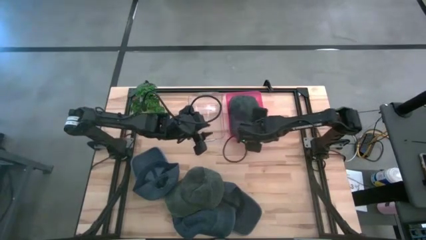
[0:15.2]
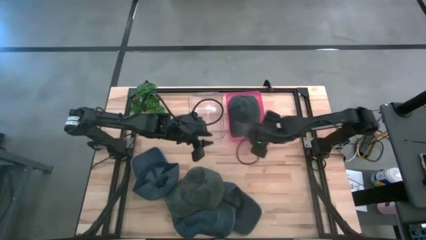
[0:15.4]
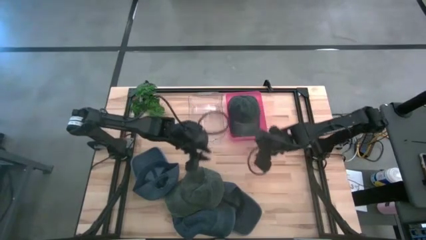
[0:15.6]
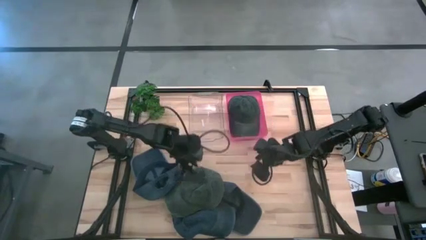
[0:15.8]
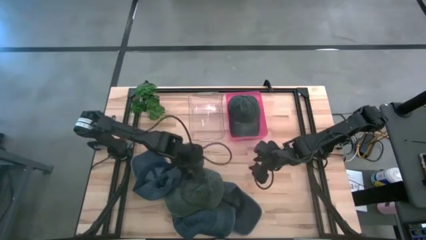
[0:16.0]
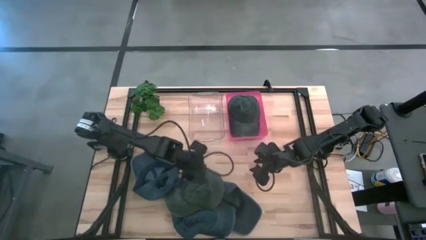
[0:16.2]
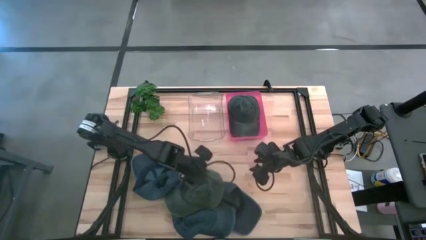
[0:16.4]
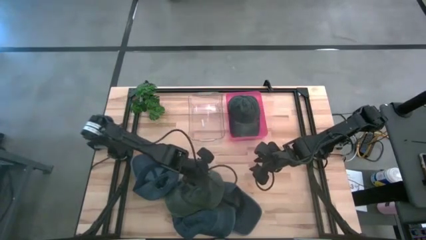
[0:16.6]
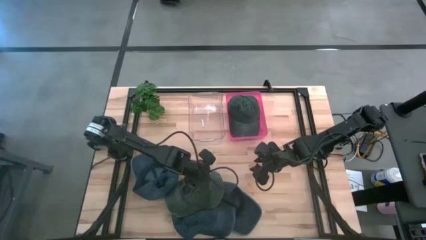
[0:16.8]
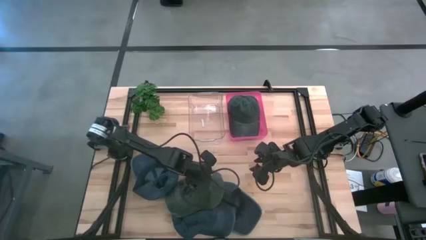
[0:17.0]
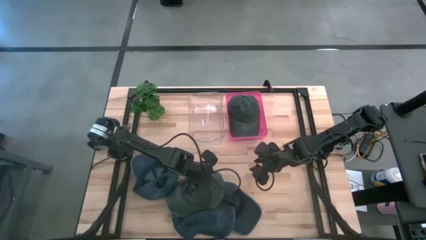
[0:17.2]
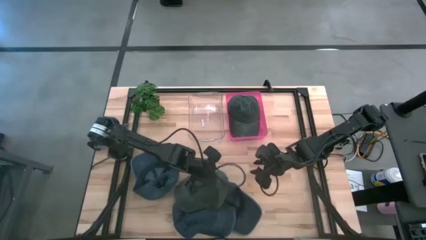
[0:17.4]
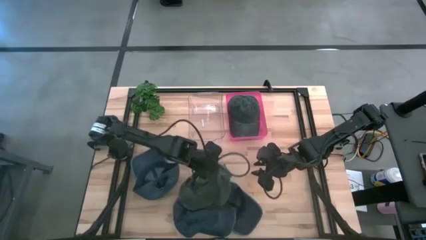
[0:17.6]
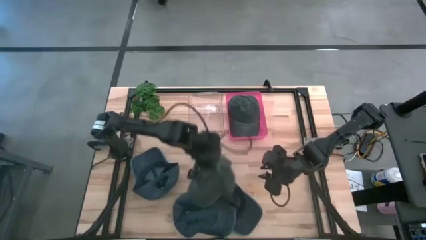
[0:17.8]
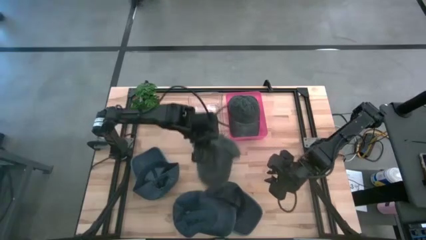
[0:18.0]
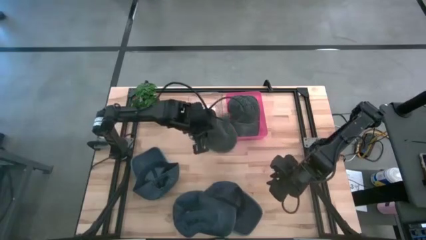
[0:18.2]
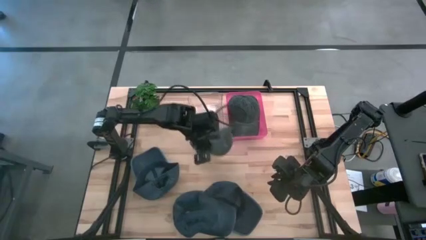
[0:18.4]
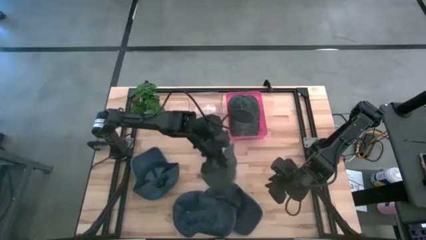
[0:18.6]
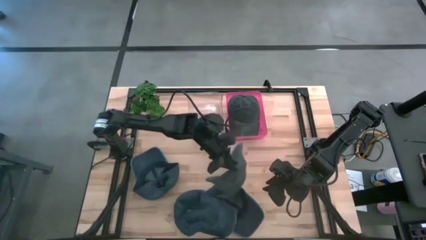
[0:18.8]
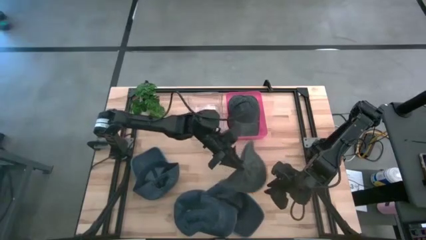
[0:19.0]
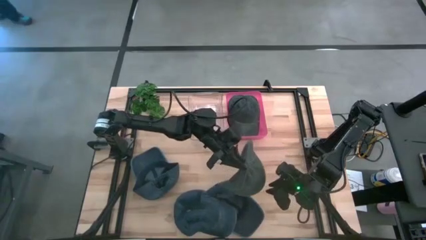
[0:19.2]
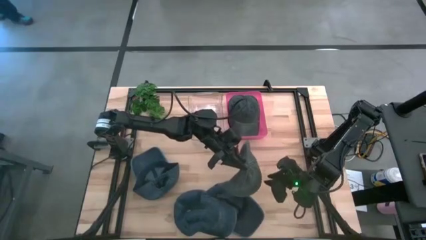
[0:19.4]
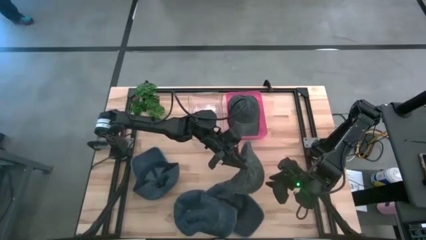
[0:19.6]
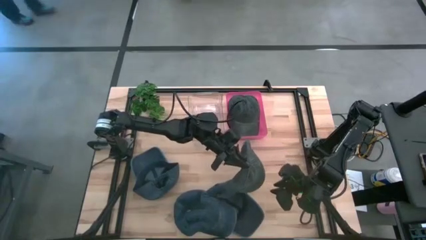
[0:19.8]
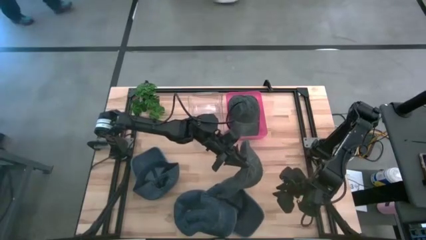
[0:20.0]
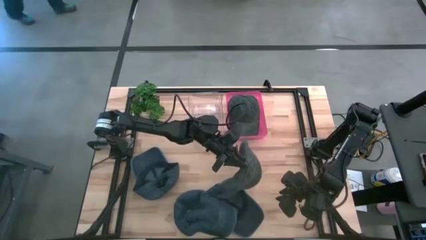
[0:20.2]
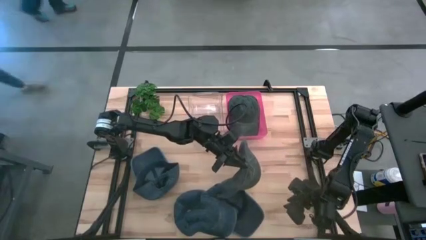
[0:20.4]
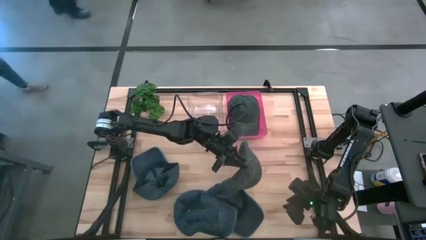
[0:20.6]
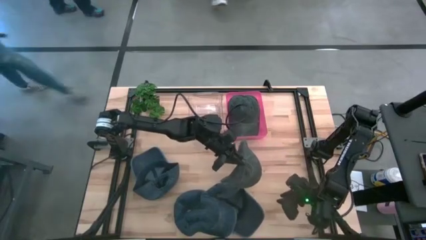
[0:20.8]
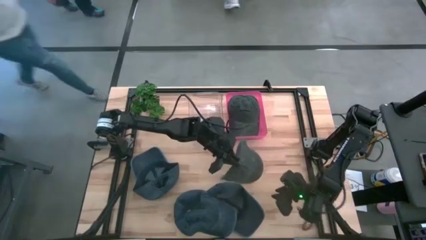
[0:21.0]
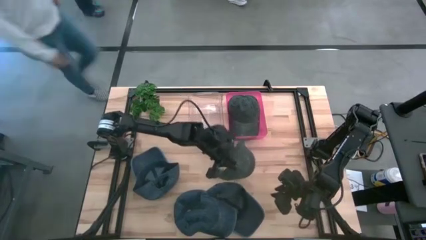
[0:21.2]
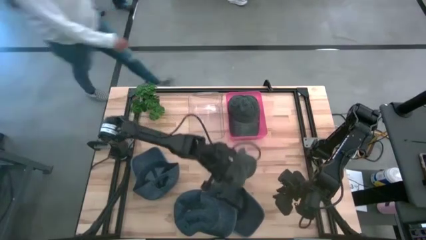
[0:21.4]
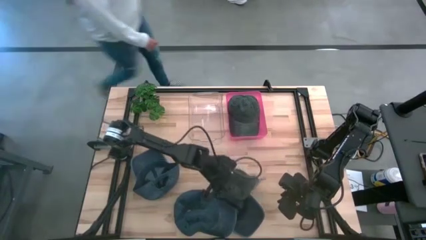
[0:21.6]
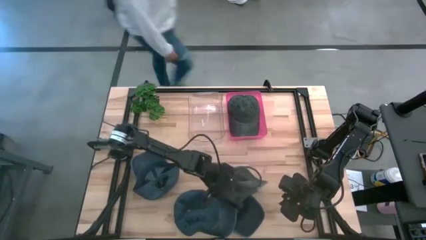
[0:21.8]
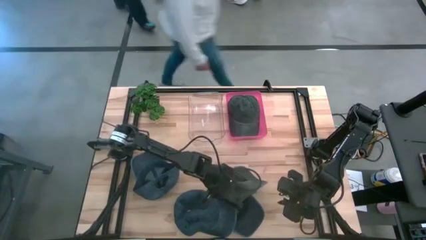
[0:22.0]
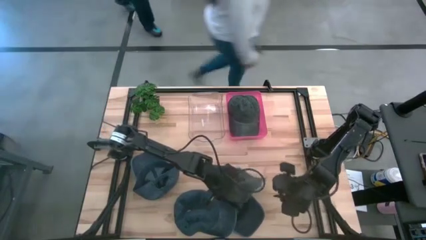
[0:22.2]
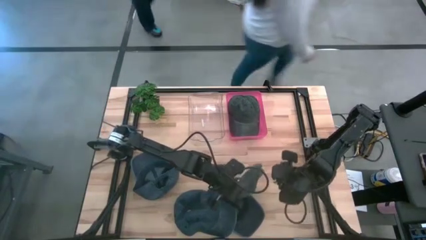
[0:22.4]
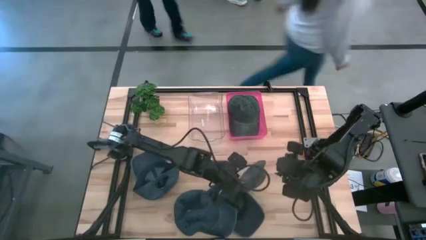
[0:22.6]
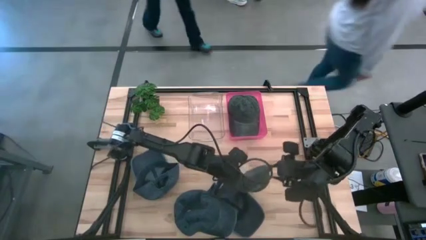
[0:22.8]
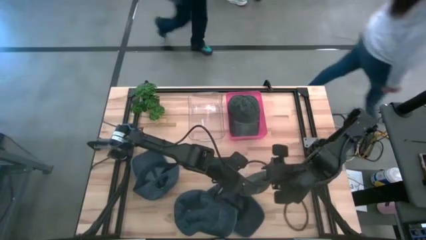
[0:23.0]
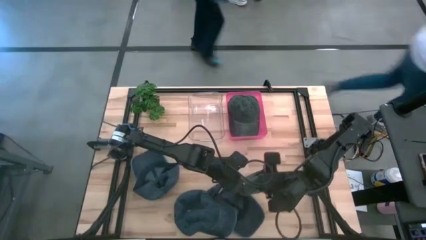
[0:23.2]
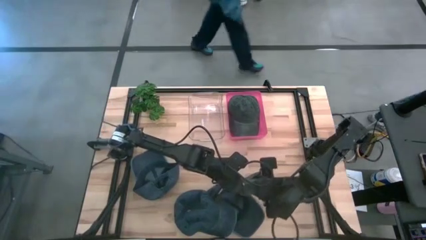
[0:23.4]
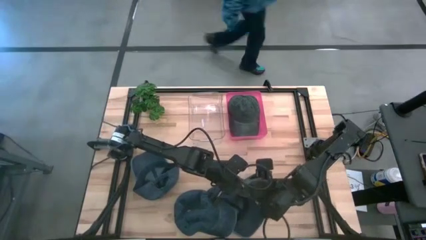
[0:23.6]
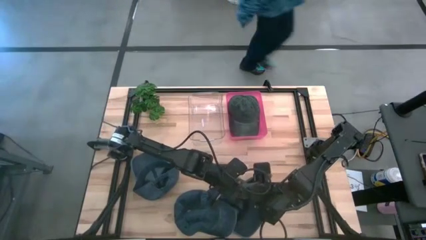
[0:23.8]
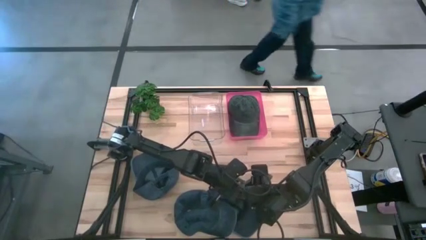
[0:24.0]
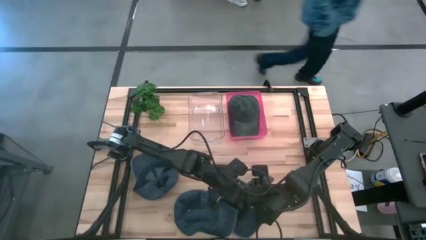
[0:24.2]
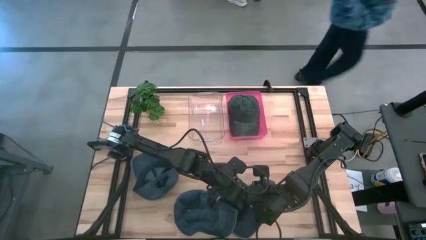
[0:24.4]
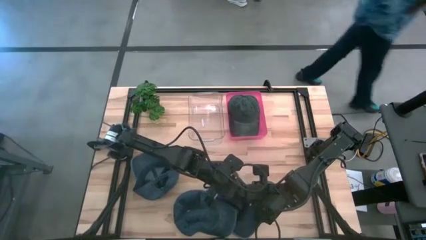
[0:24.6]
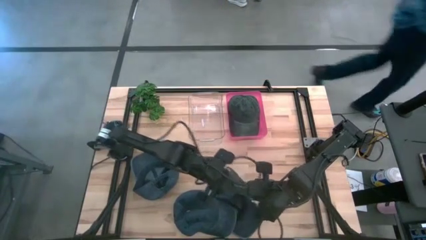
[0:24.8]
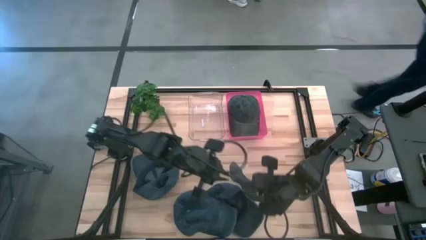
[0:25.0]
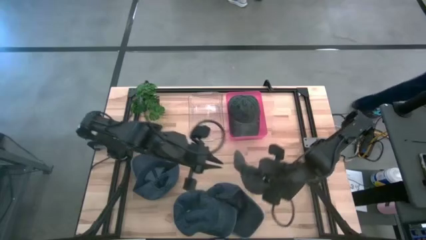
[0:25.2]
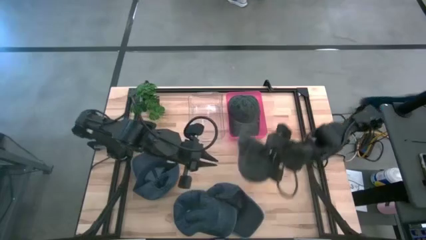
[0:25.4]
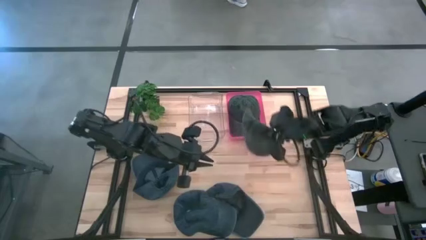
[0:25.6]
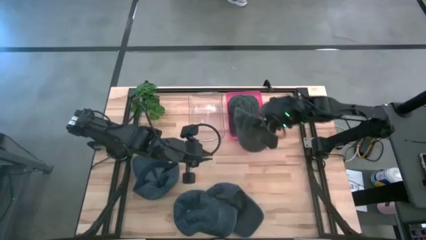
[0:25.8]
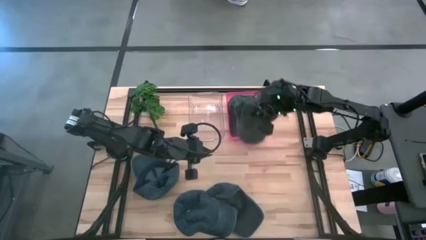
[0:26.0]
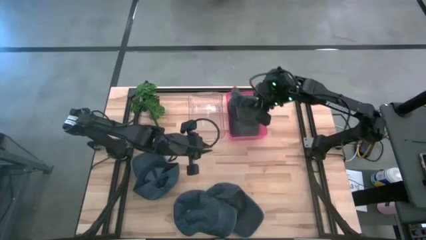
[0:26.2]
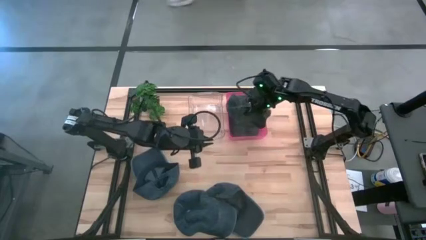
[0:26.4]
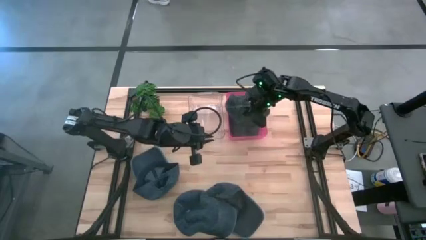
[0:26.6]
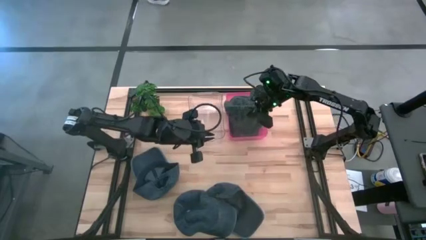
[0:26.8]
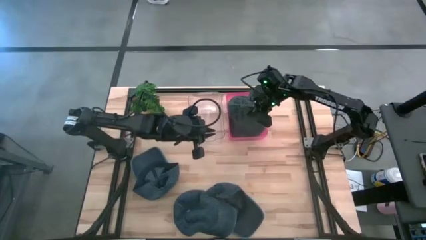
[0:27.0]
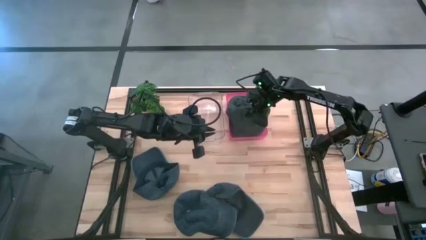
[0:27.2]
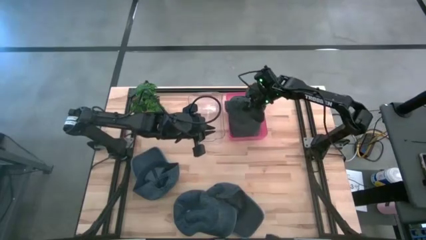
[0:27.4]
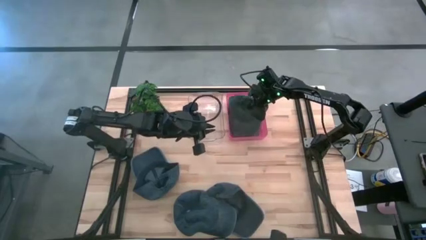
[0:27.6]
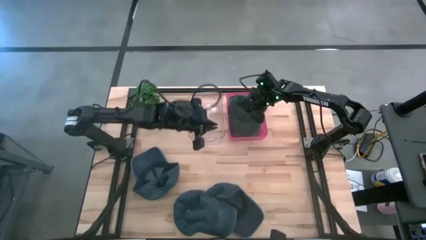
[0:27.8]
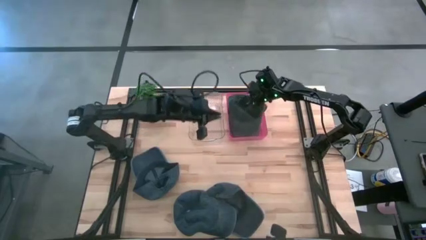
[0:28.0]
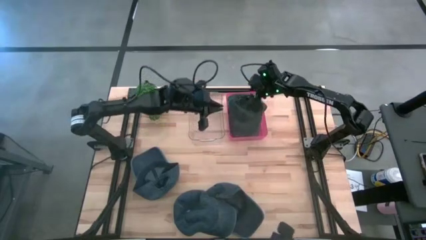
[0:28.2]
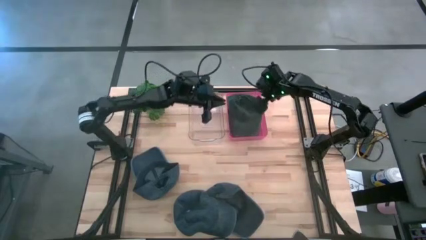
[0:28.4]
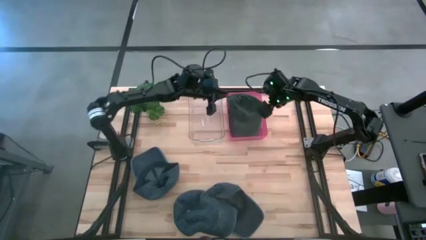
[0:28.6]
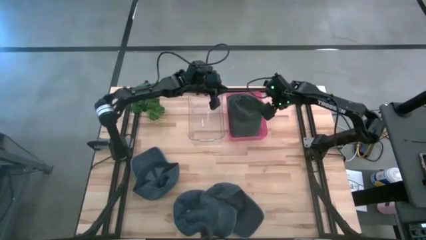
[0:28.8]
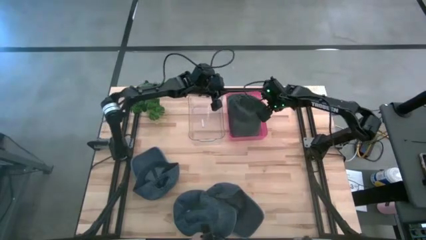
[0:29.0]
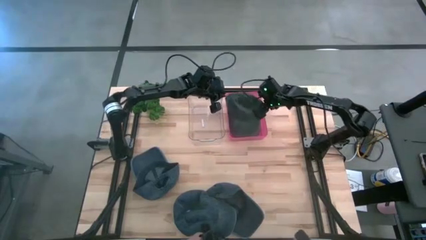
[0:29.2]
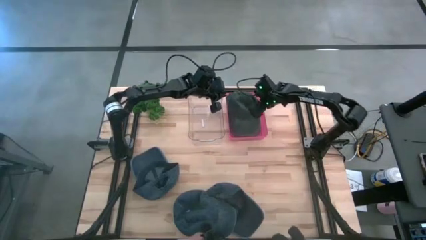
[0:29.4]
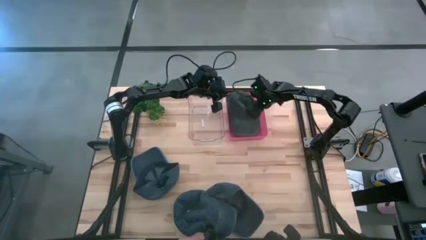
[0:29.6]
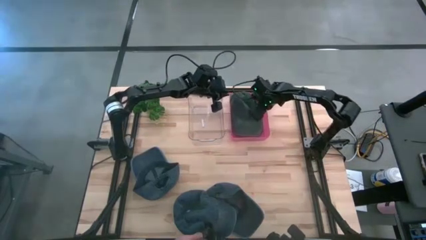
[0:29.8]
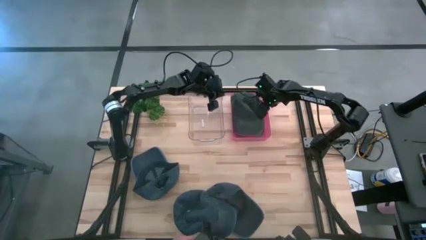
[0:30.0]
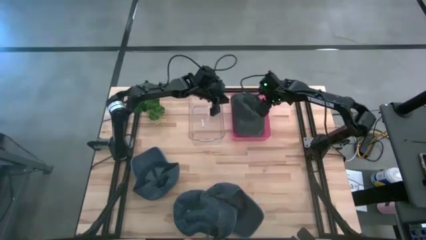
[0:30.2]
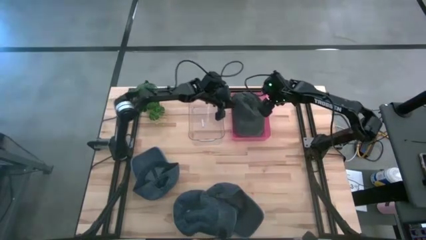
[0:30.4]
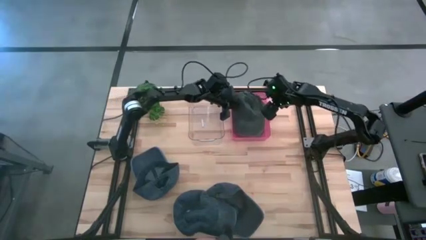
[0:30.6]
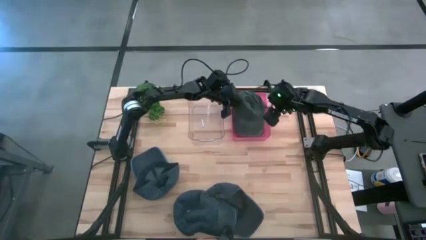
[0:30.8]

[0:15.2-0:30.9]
Task: Pick & Place hat
Put the green cap into the red bin

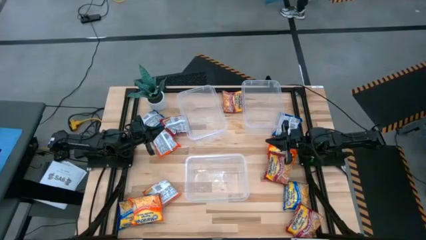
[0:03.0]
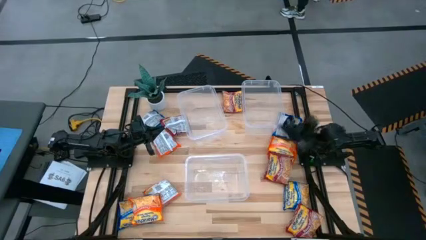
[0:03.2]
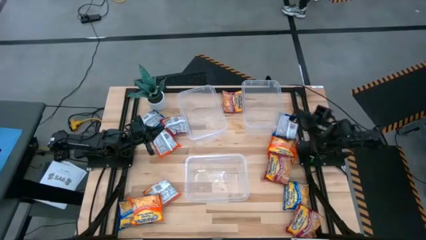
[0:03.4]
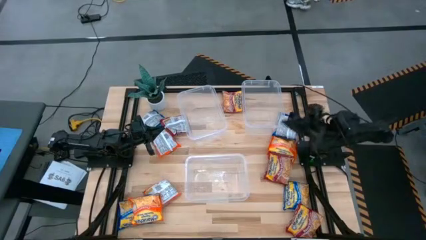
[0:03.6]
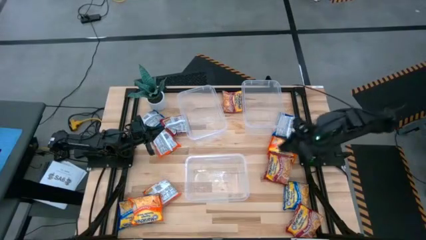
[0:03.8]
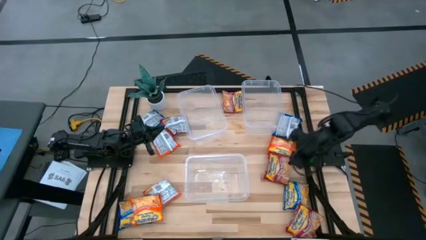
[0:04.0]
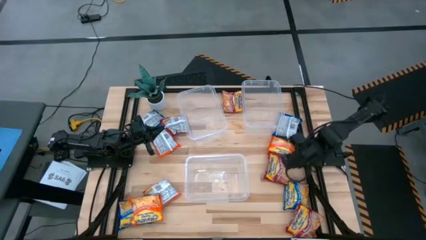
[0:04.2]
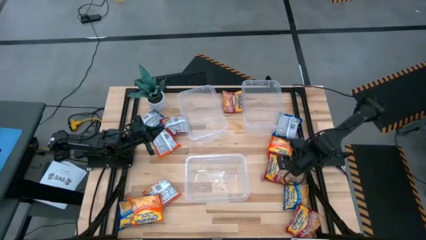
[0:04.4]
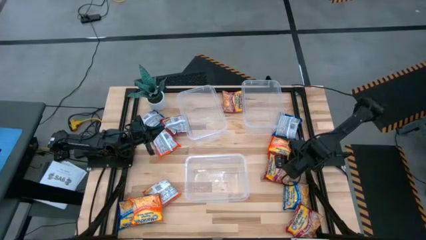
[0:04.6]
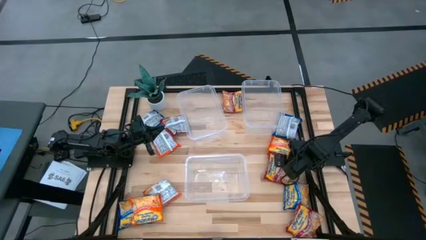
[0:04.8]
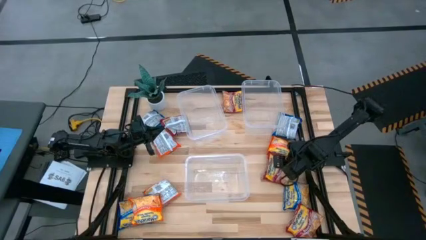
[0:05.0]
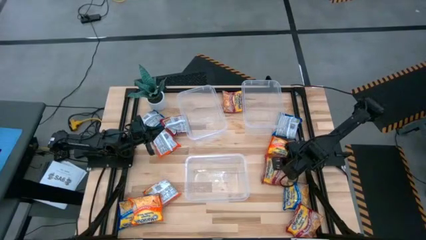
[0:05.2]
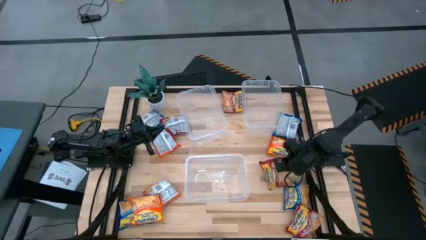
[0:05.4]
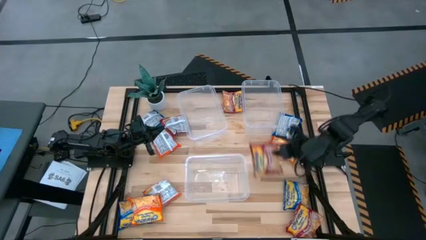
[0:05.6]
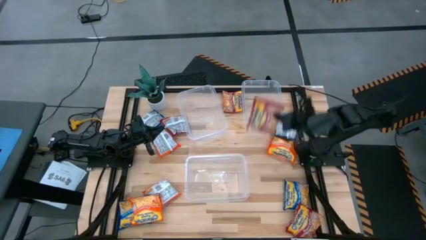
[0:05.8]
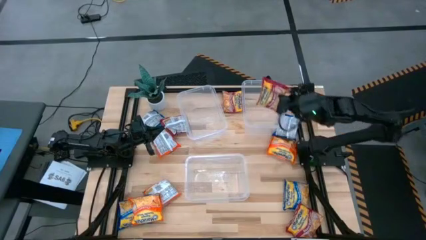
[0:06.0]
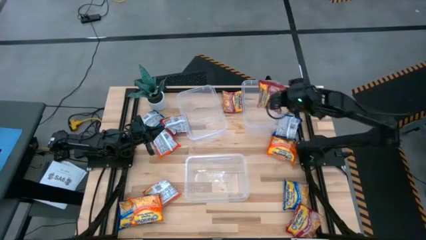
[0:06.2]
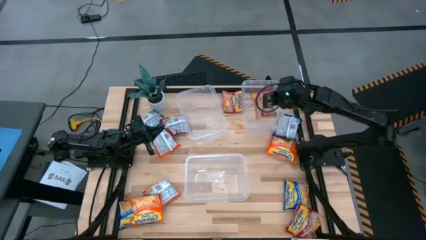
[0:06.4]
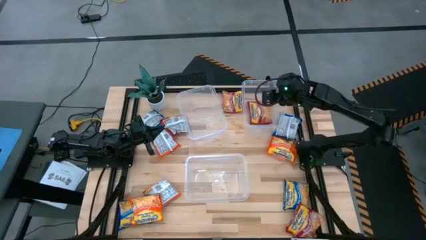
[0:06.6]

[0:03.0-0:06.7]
Task: Sort Maruchan noodles
Put the middle right red bag into the top right transparent bin
